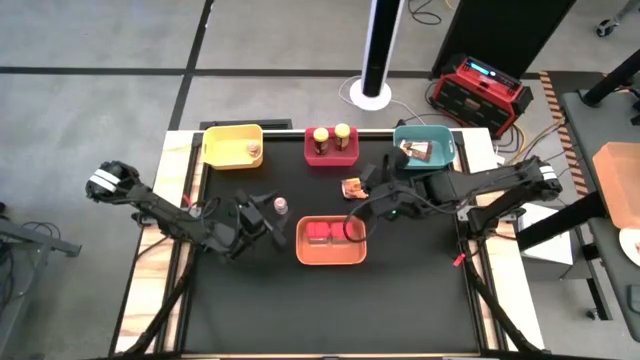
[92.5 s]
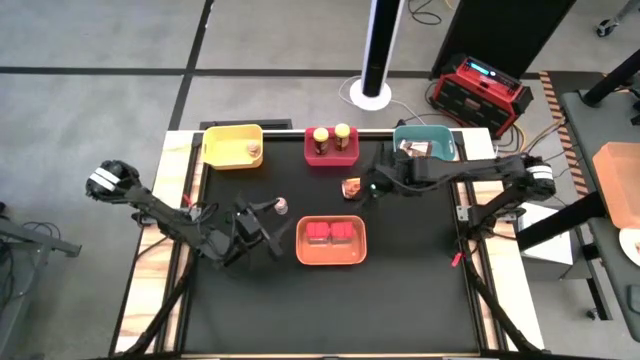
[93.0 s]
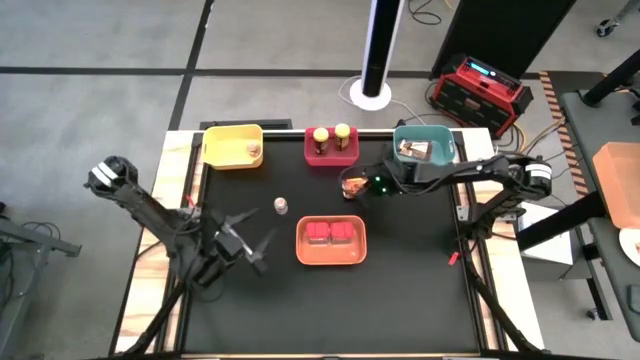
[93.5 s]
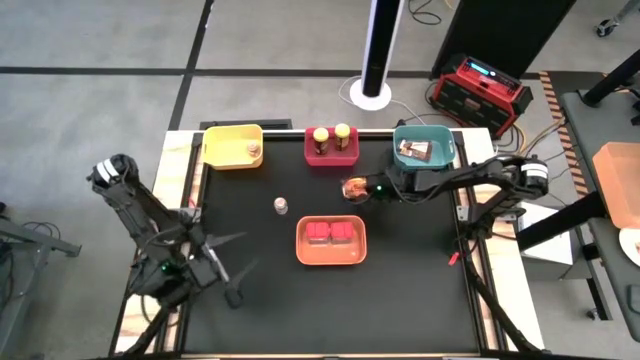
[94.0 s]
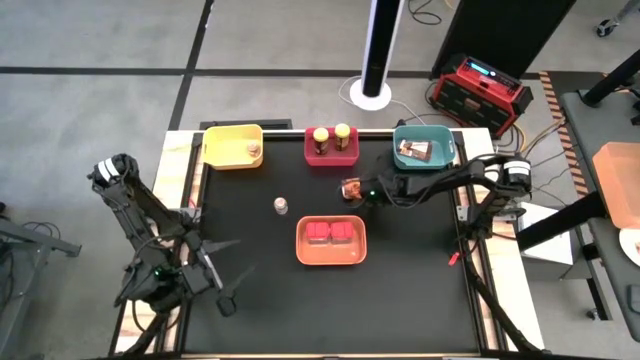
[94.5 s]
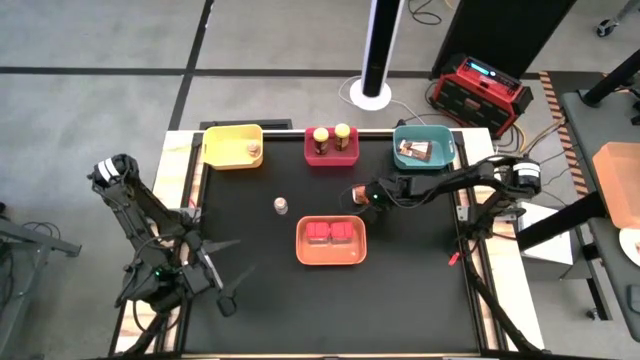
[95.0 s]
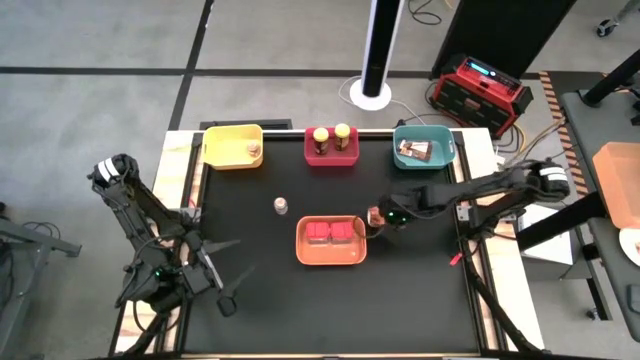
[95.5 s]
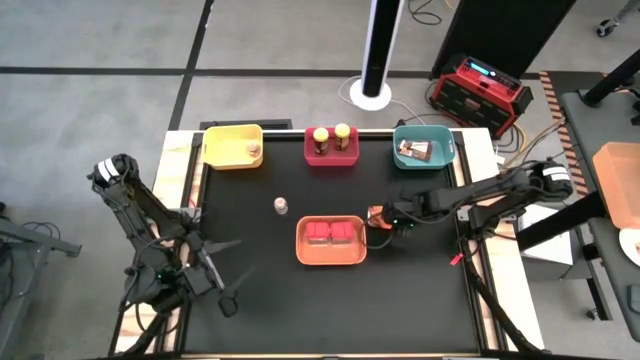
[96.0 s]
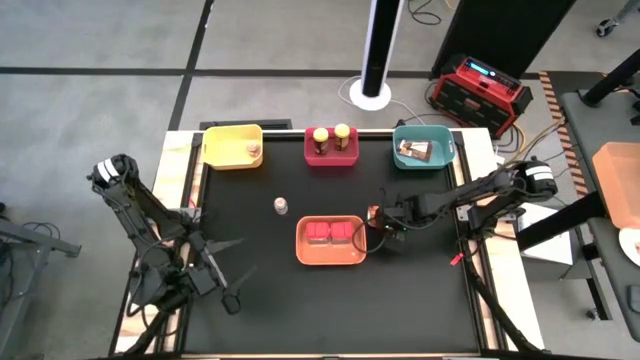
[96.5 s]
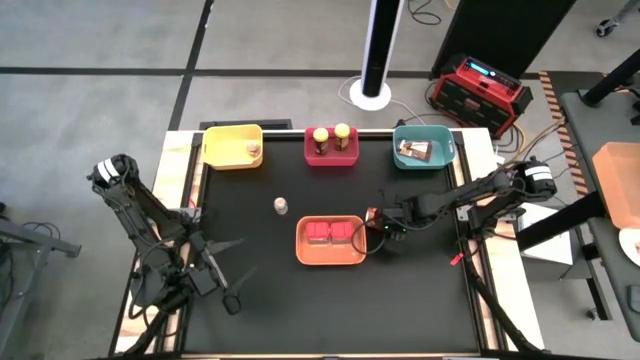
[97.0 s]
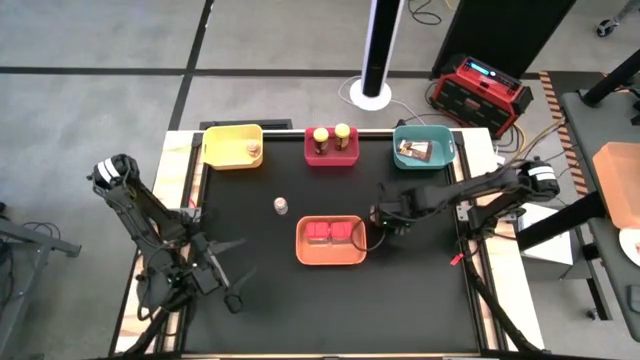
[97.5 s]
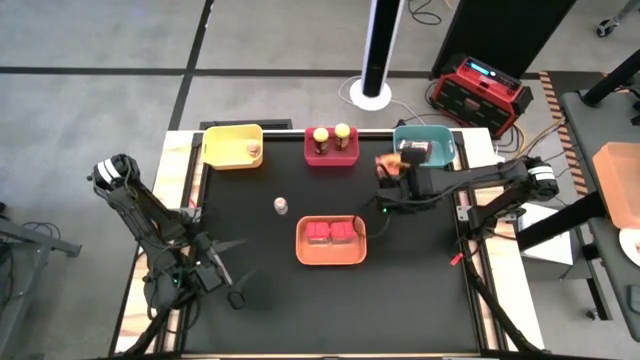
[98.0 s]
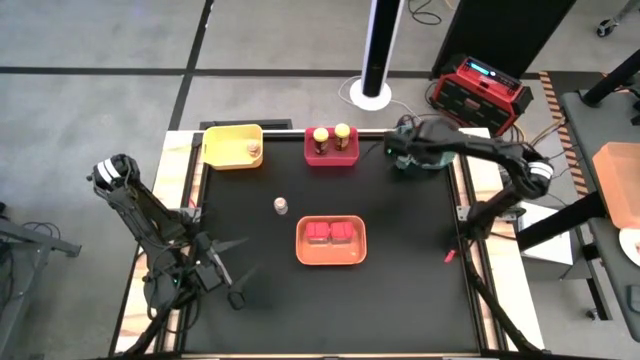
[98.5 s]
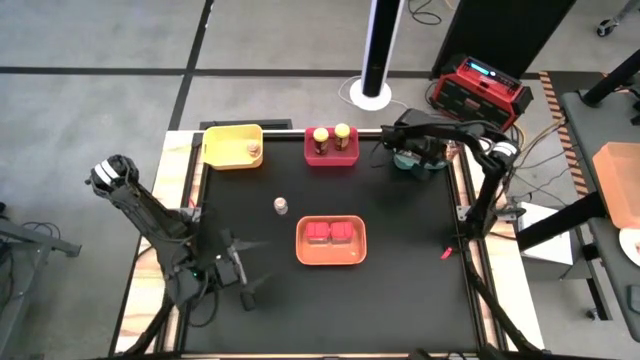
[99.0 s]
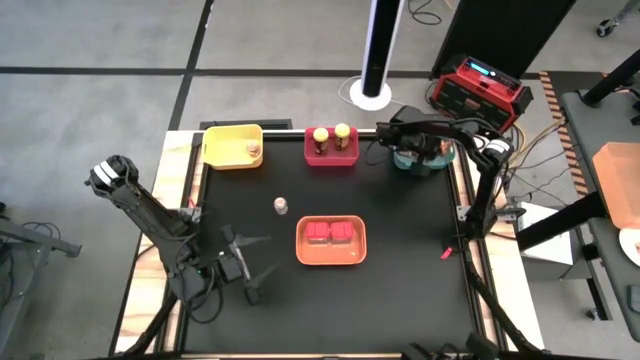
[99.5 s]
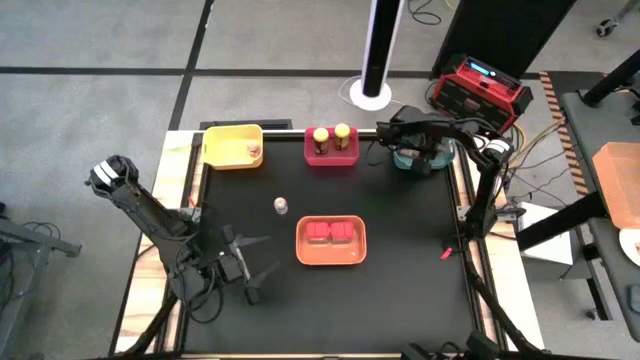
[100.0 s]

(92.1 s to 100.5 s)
Task: Sort spices by type
Put the brown seasoning bag into the green bin

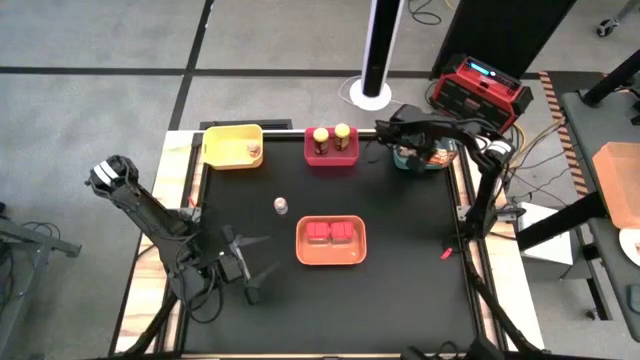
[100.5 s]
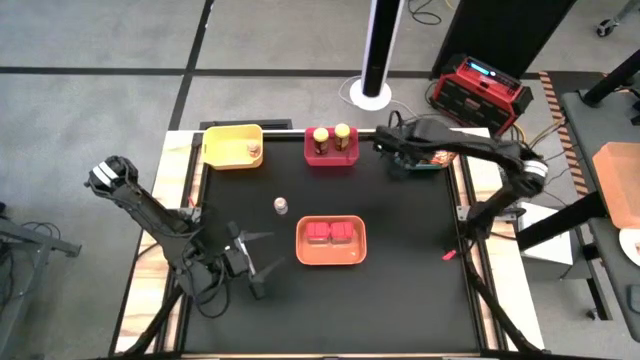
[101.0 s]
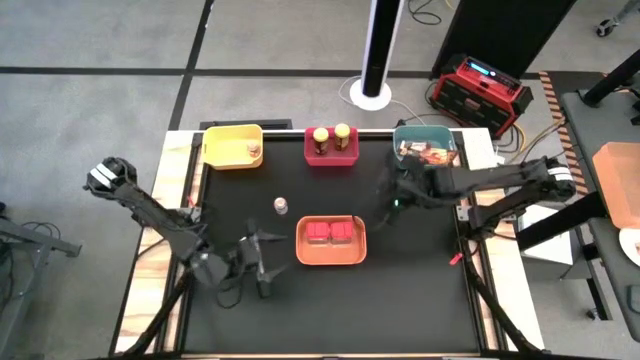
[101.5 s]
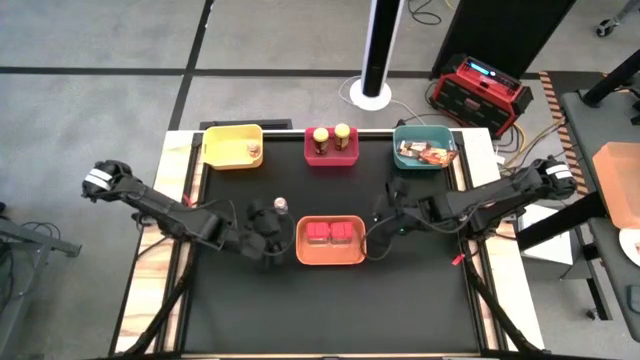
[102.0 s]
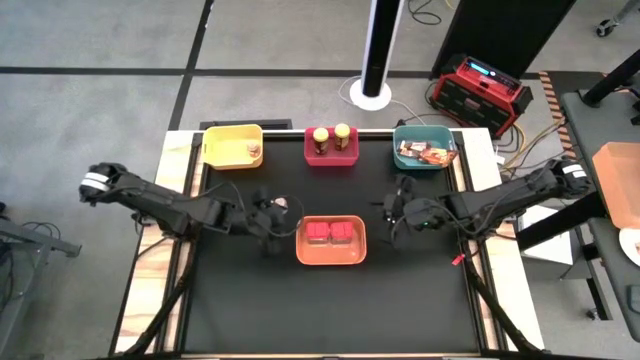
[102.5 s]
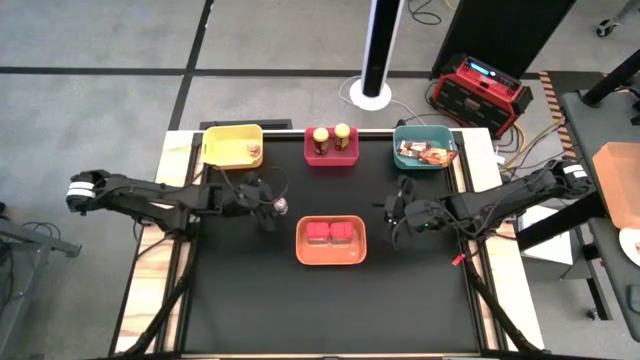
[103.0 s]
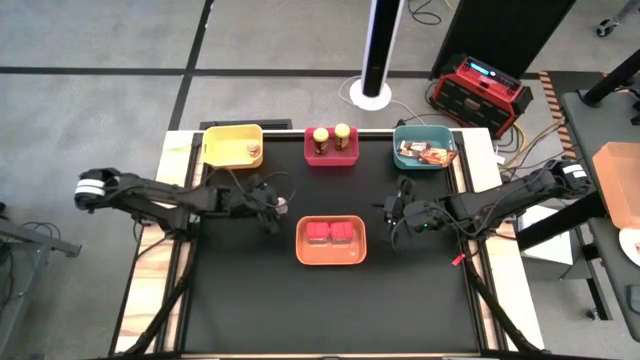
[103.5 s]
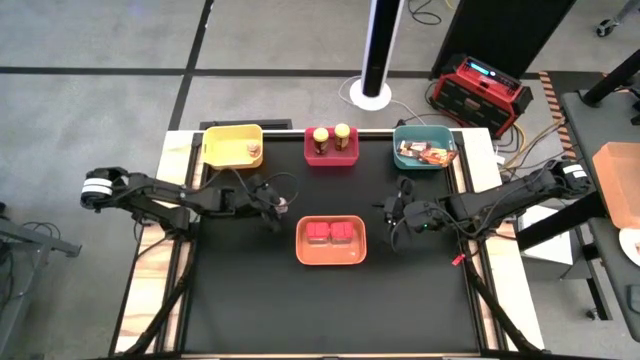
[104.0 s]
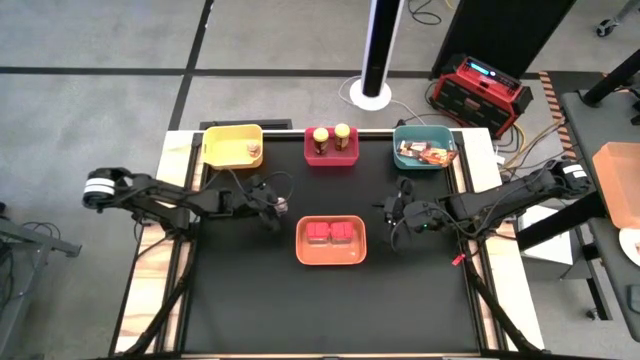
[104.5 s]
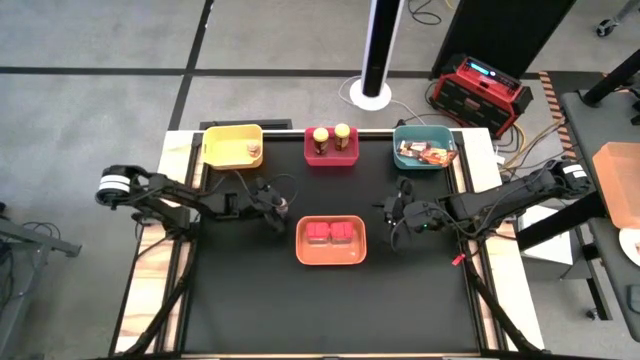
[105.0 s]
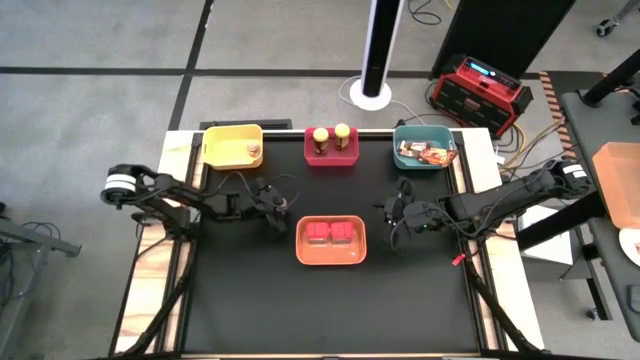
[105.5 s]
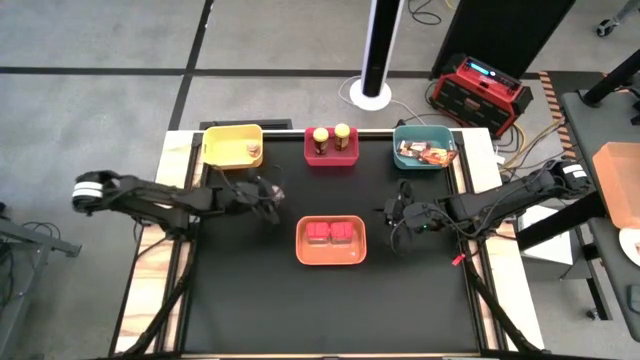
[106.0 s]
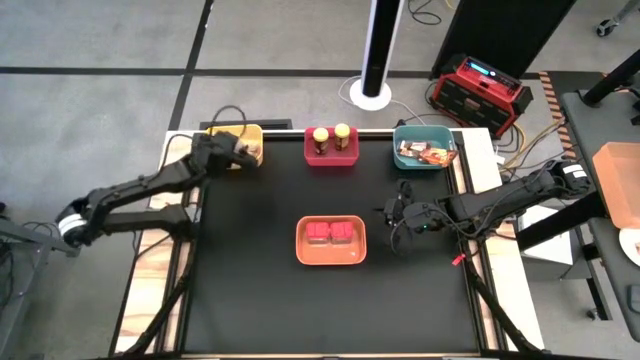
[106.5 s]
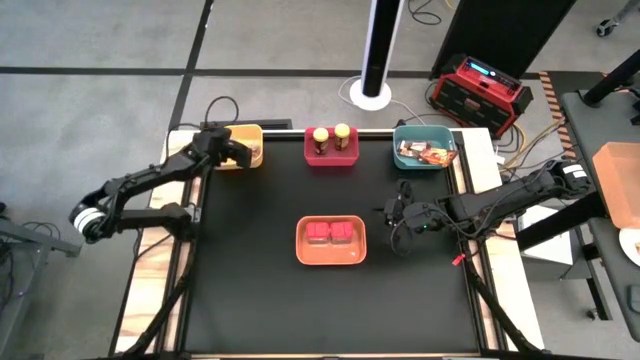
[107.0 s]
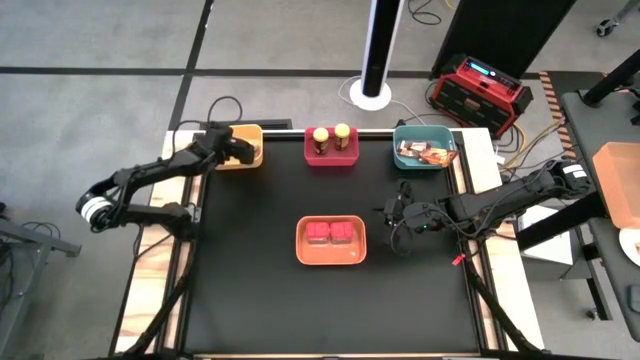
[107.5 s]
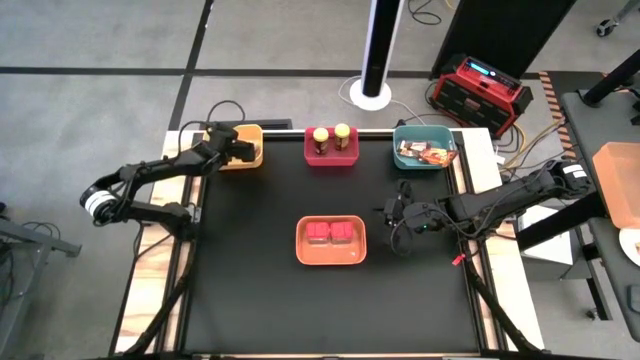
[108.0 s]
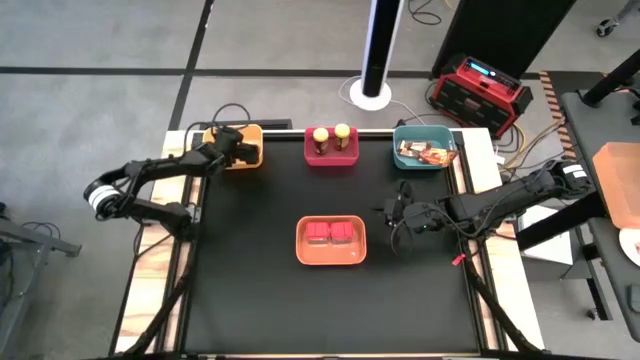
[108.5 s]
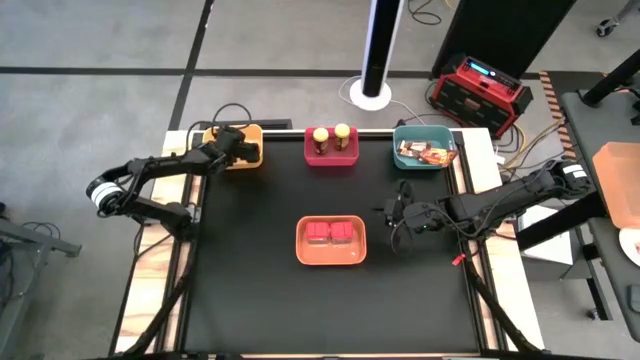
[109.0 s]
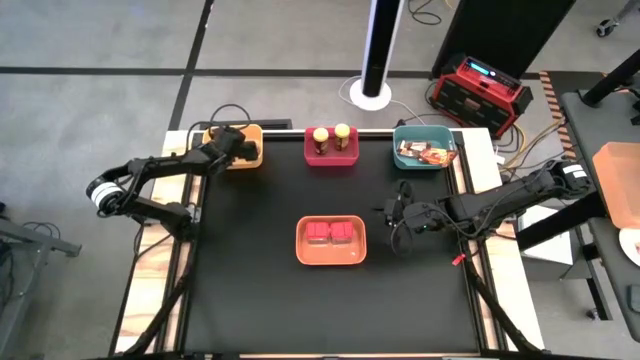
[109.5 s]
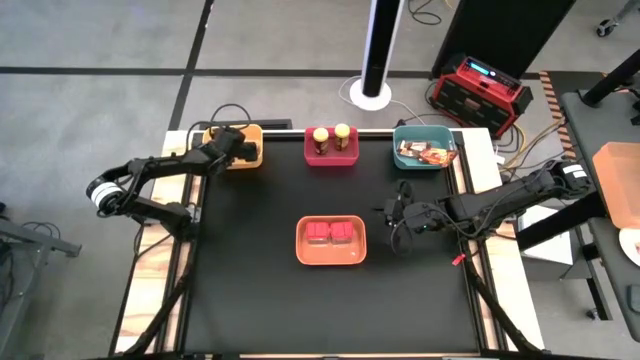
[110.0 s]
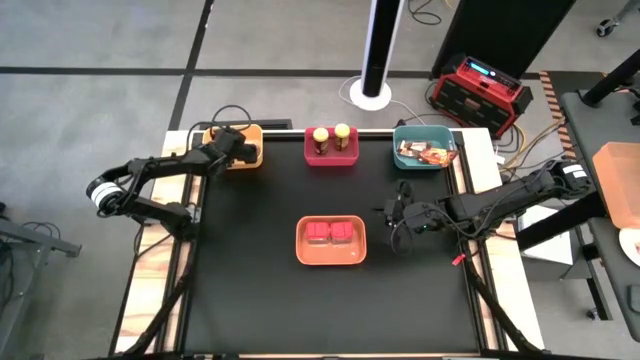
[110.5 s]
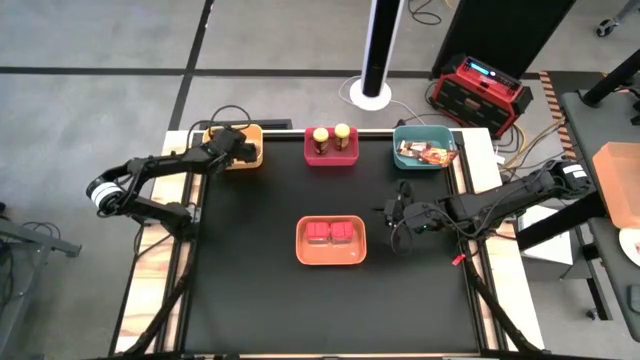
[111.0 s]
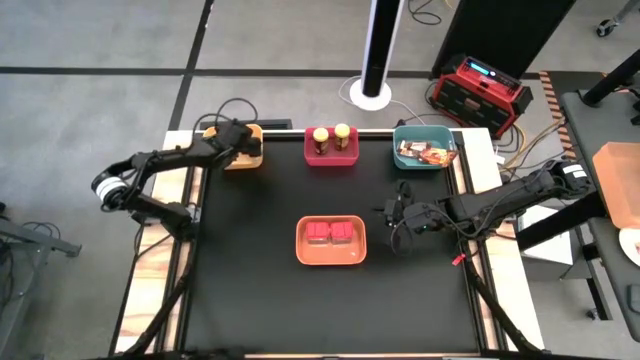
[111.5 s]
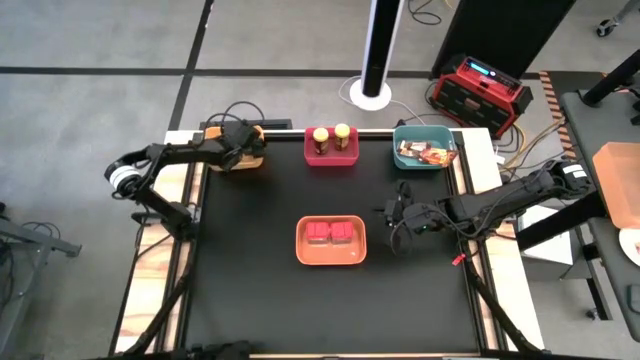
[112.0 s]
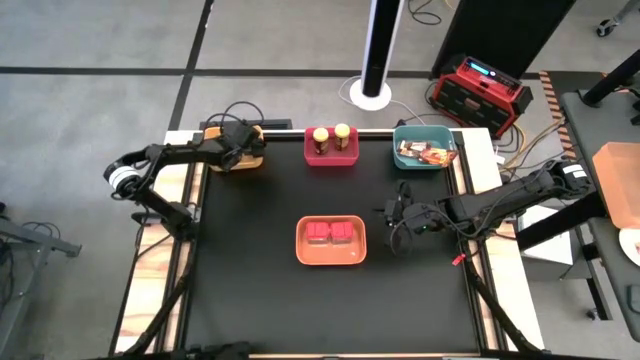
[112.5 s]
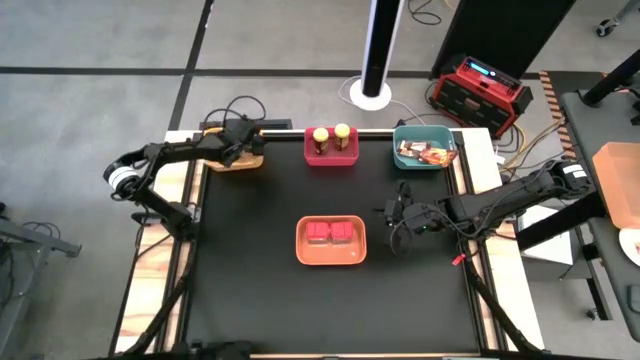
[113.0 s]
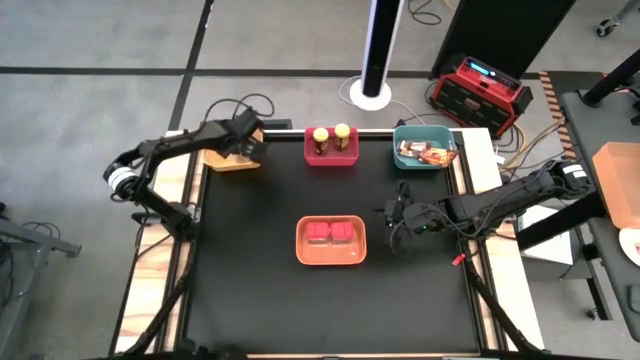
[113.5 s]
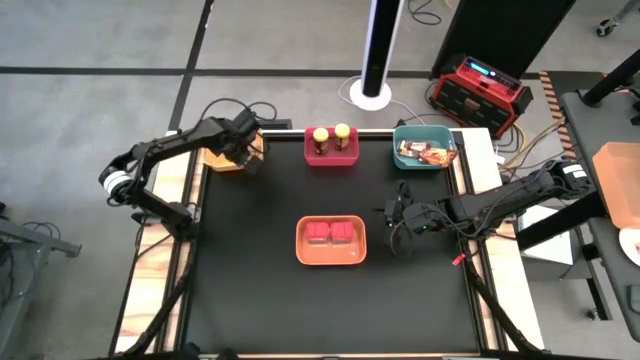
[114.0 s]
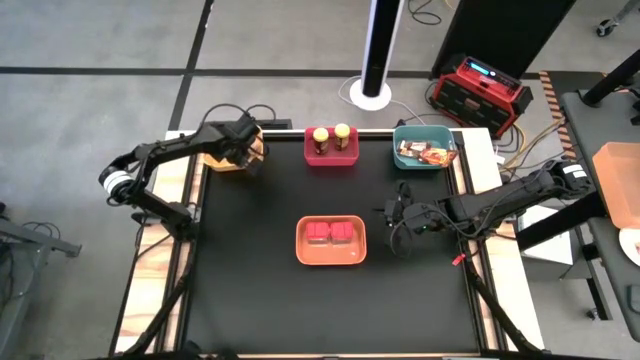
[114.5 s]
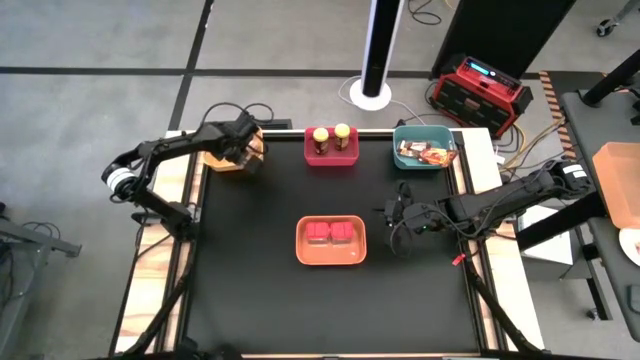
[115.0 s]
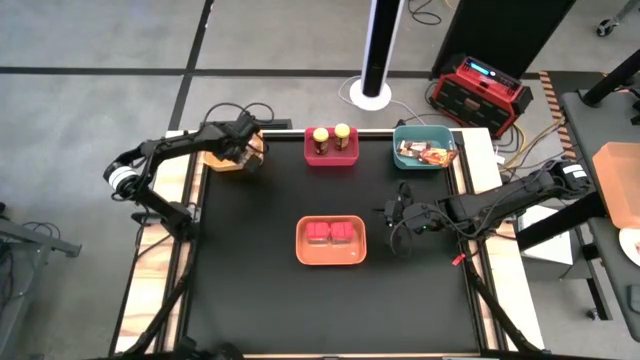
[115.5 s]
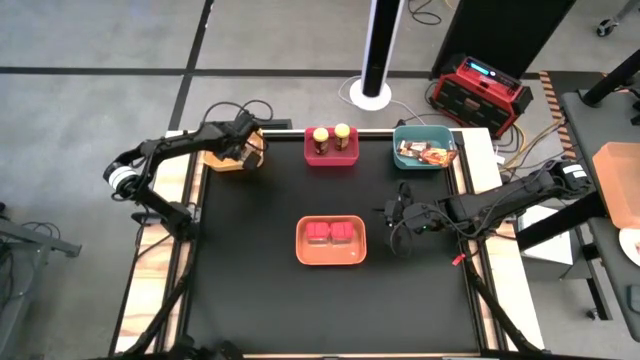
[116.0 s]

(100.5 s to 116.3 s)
Put the transparent seasoning bottle into the yellow bin
